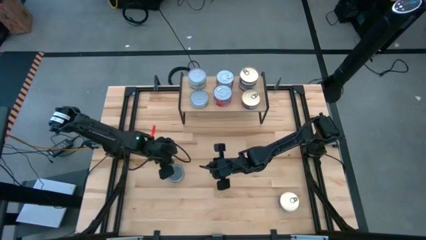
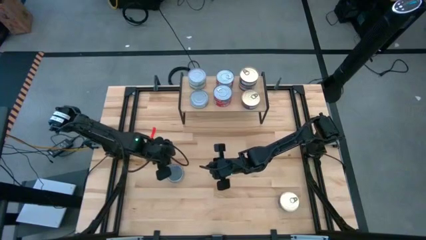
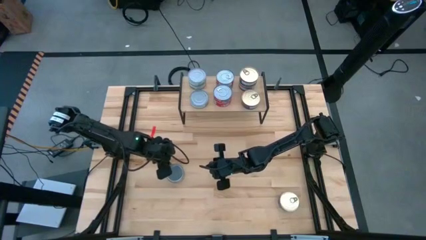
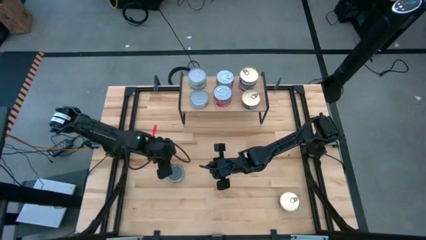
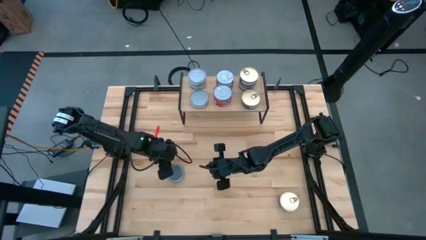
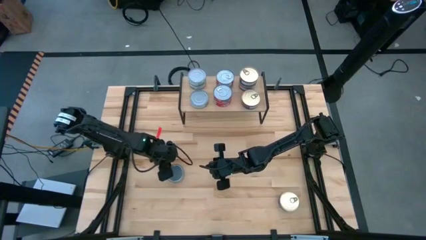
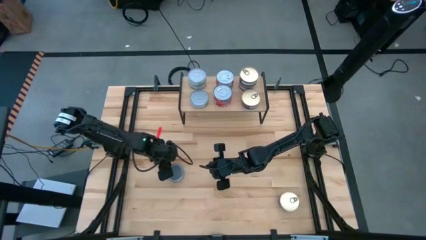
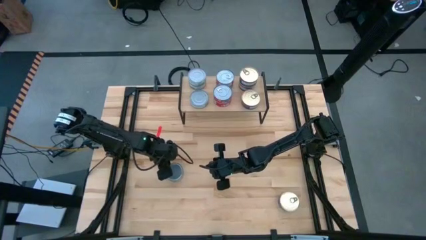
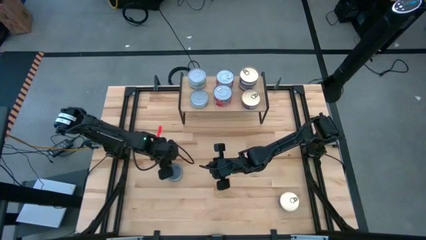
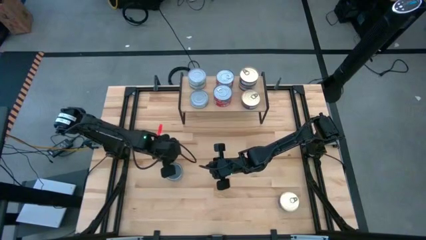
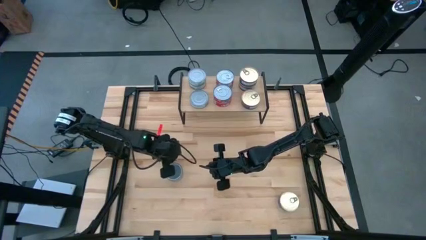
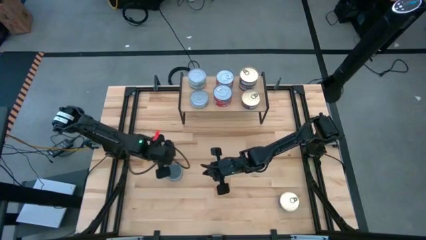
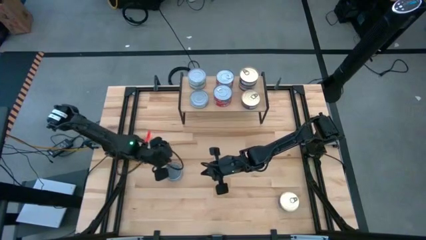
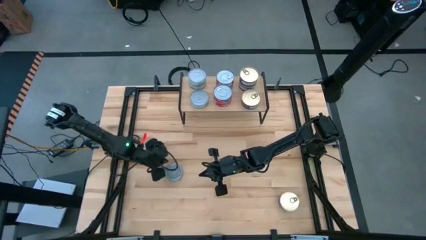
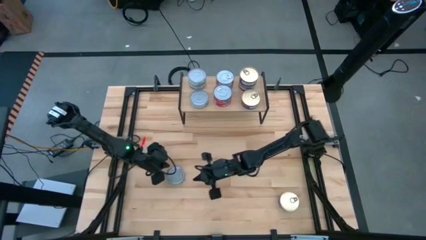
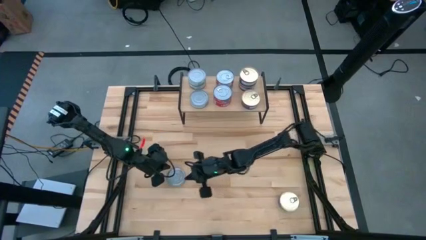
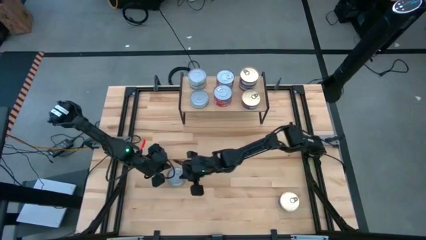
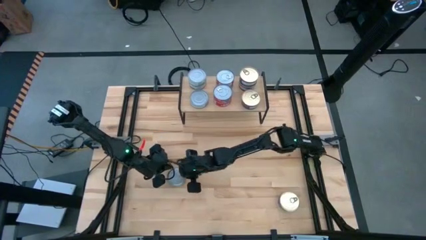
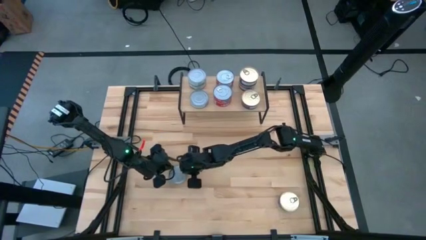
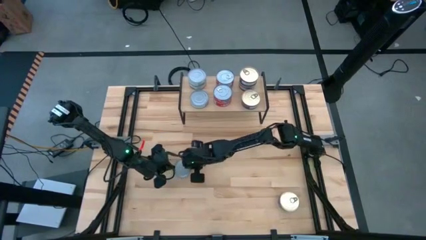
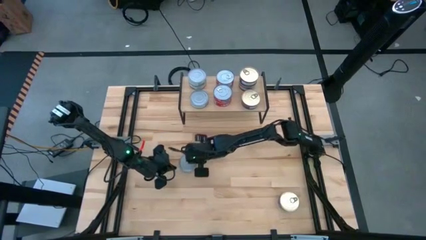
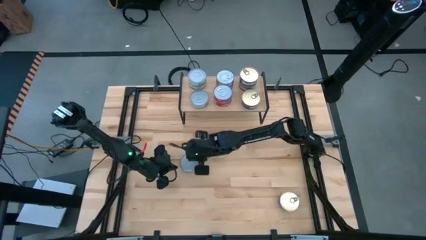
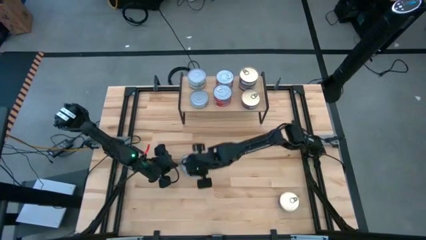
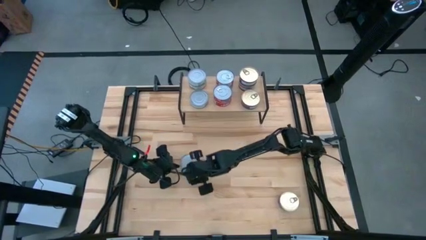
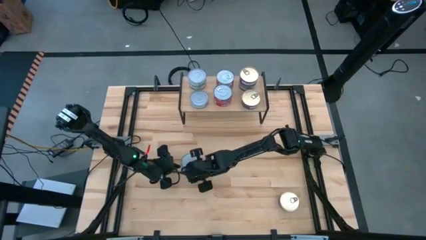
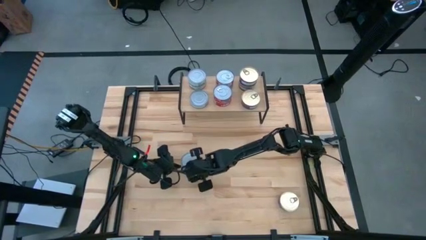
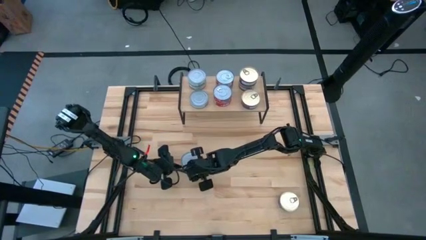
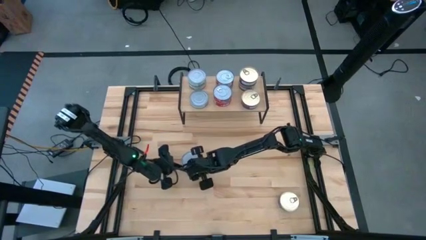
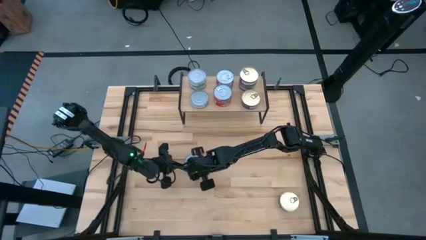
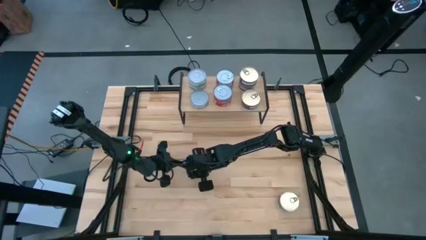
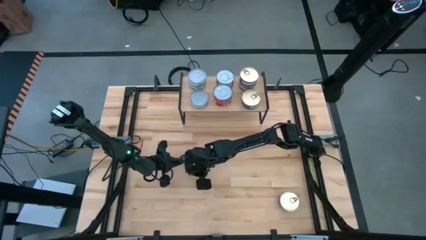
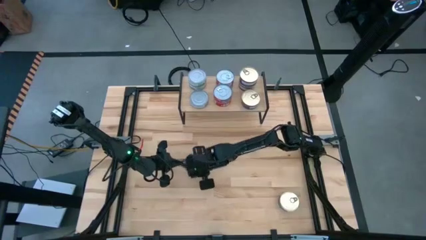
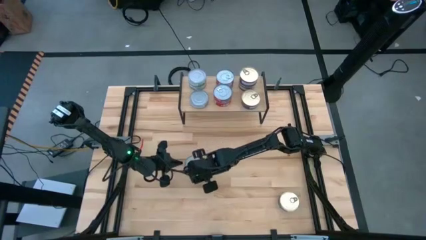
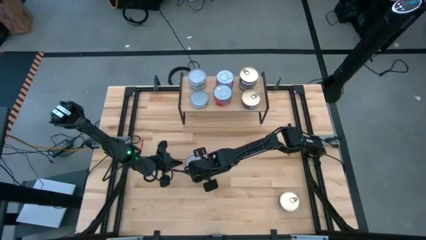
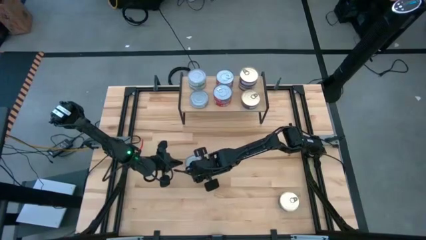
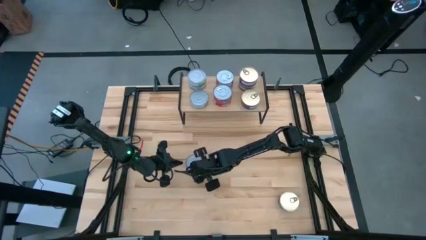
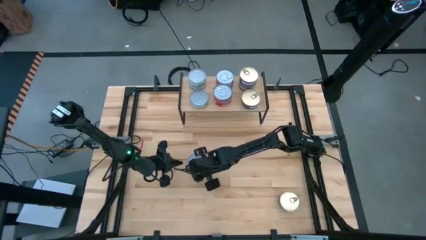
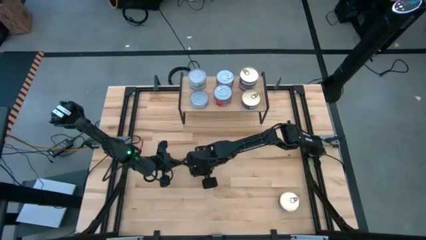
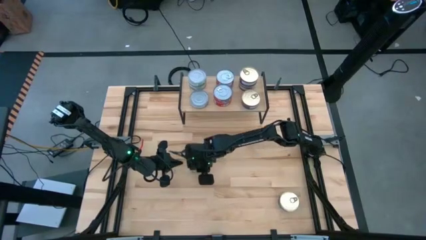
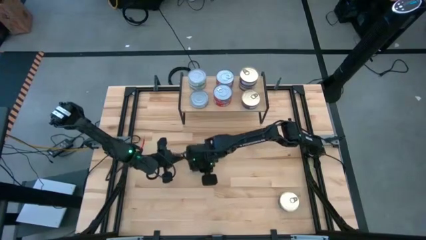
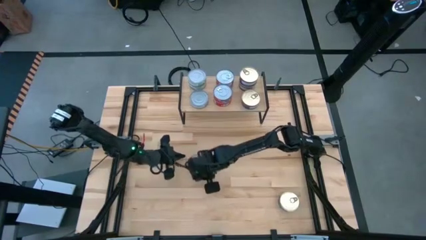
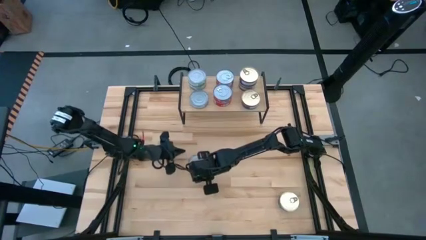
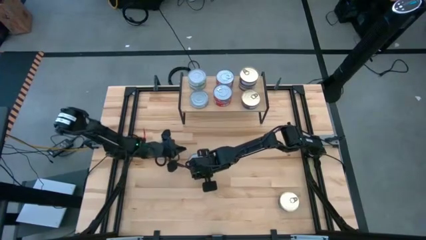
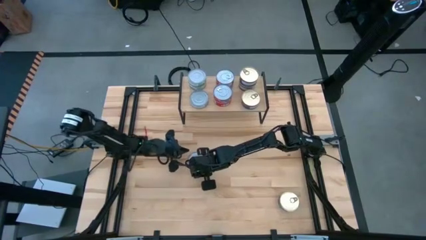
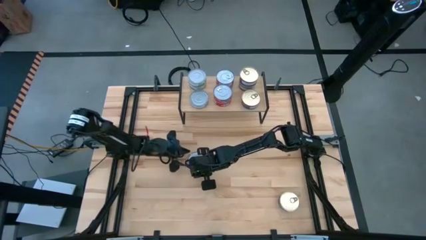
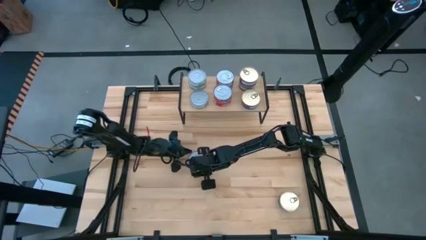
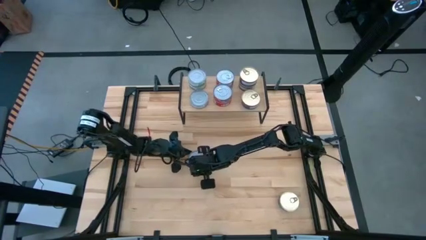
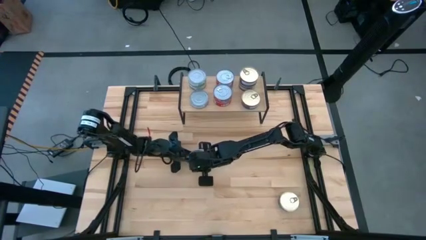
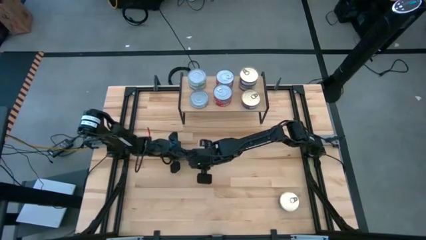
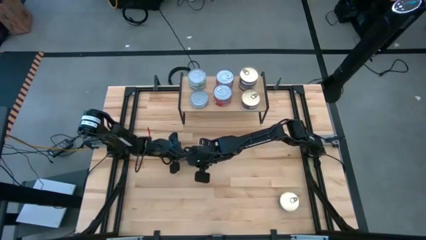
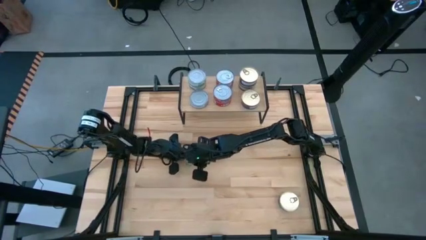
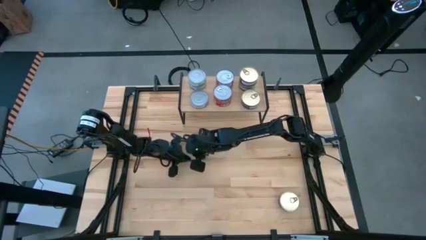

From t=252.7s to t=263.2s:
Task: Stack canned seafood by type on shelf
Stack the green and white tuna can on top of the green and white tuna can on the shelf

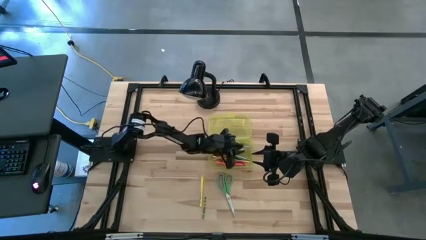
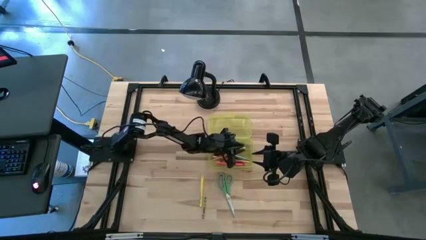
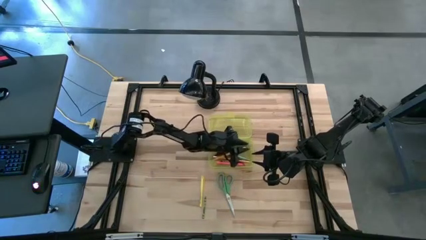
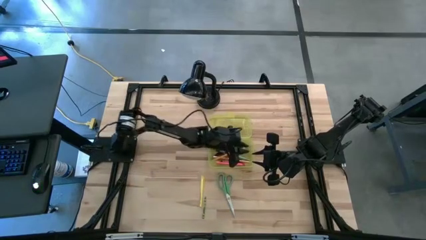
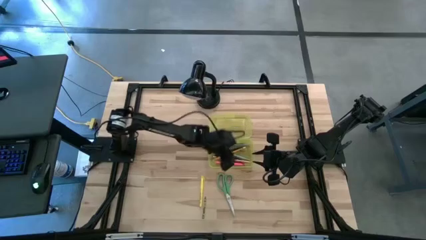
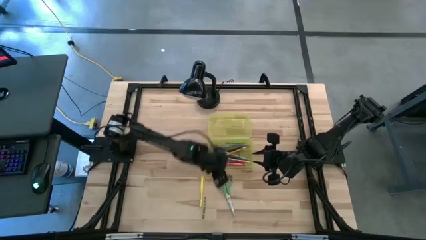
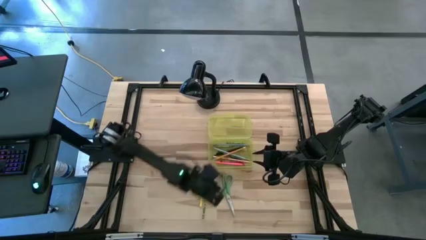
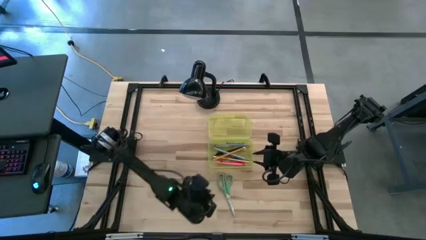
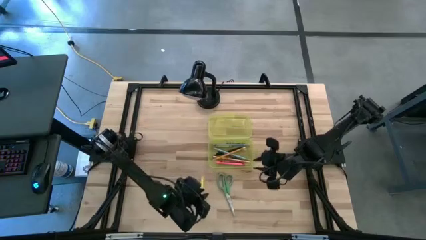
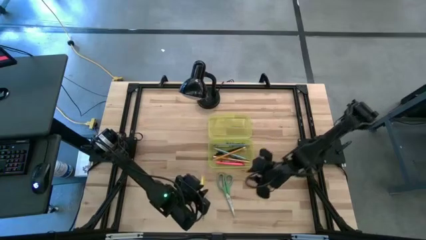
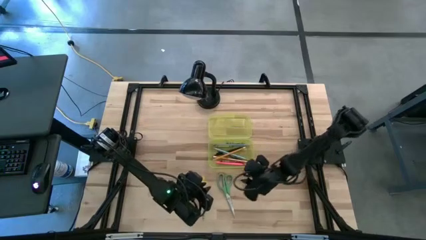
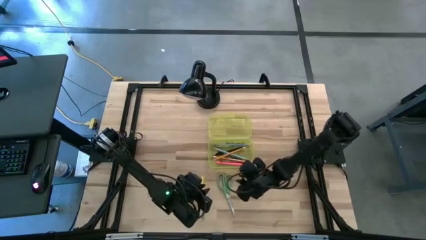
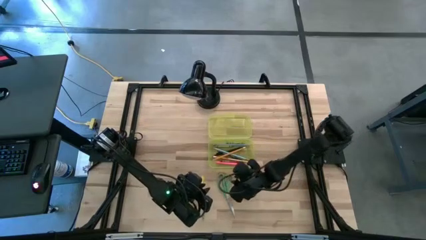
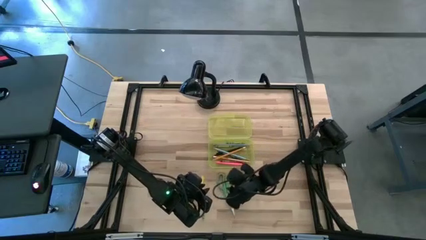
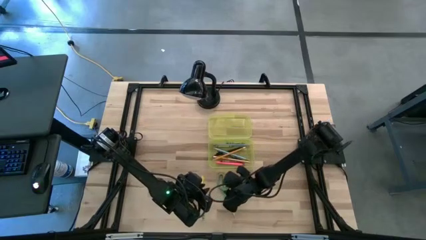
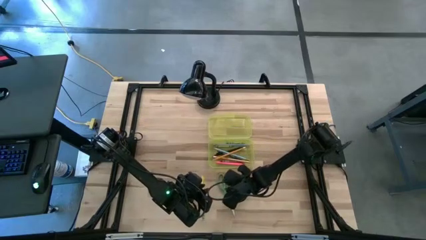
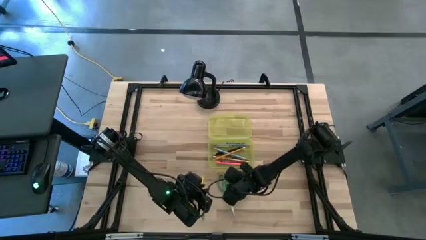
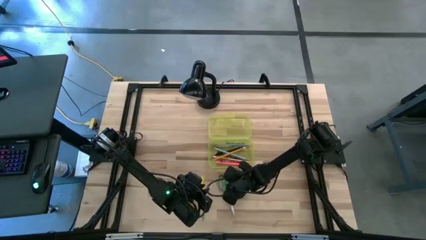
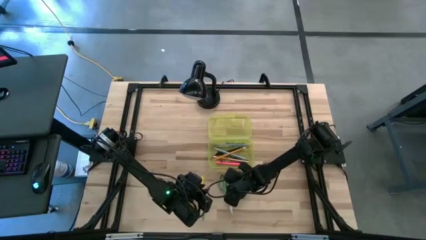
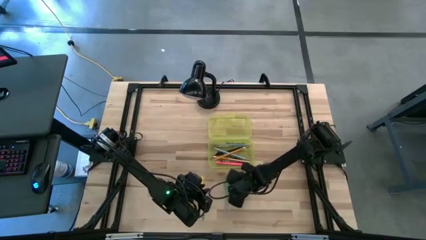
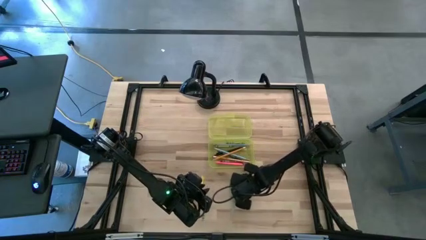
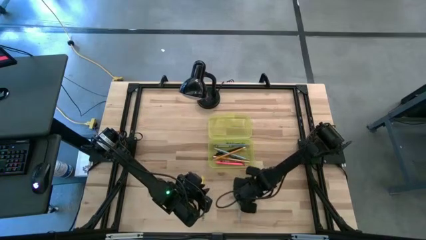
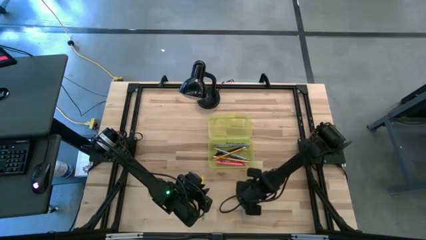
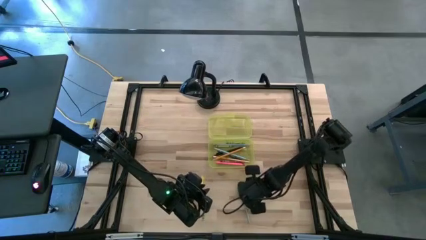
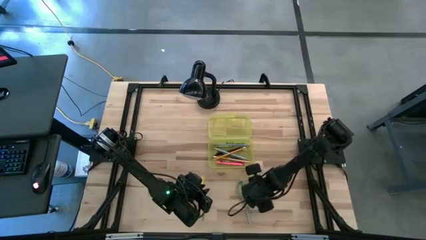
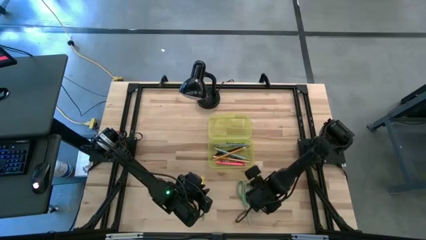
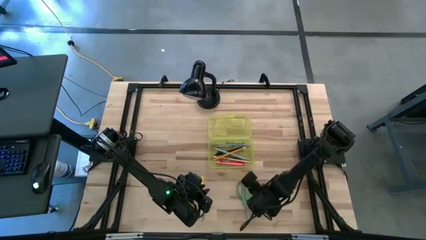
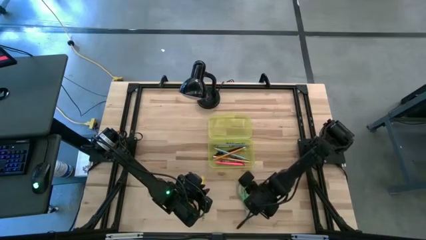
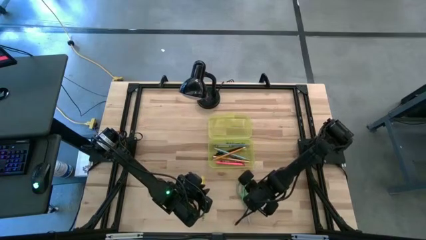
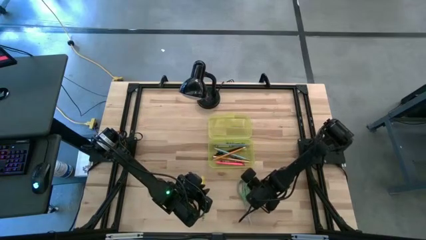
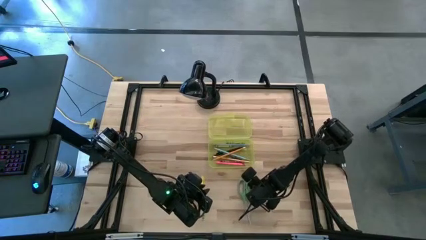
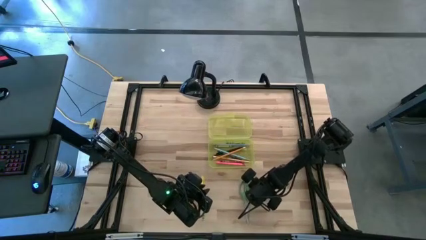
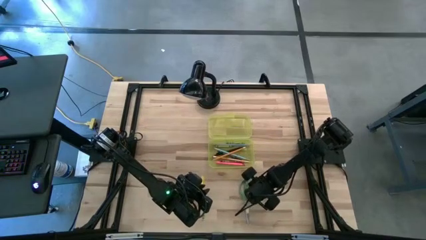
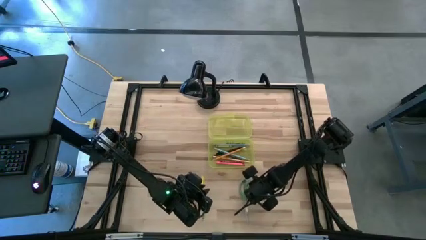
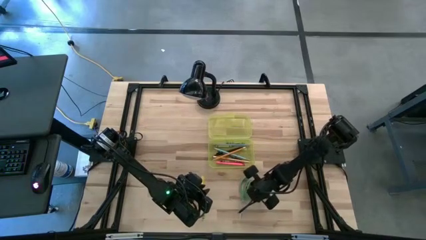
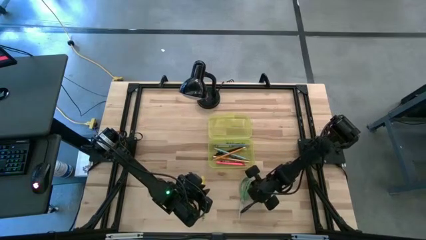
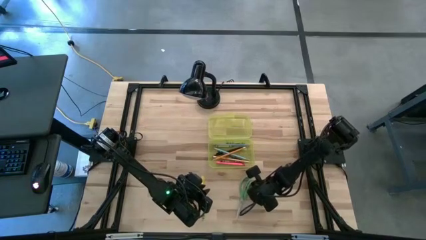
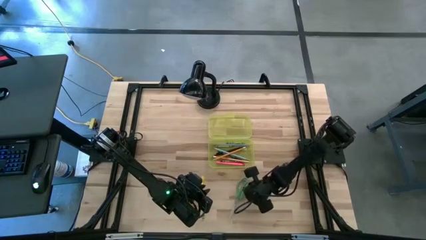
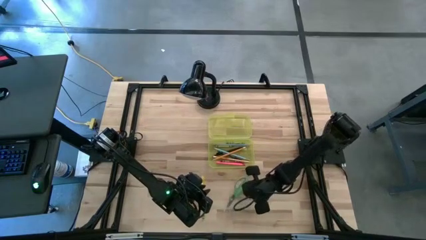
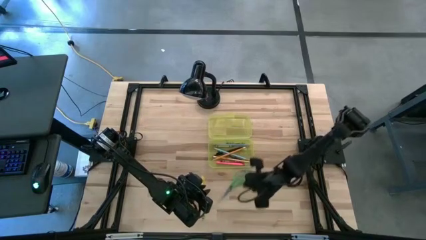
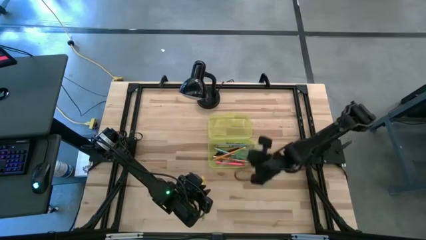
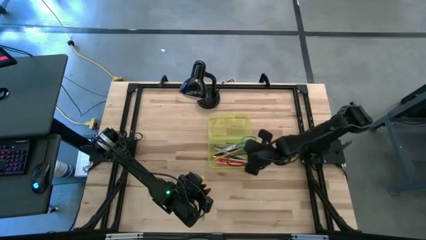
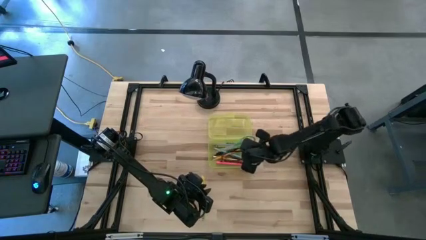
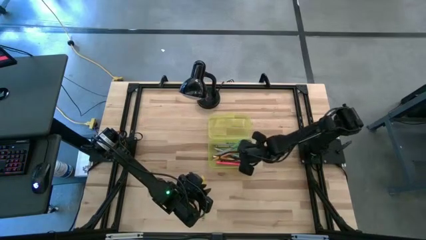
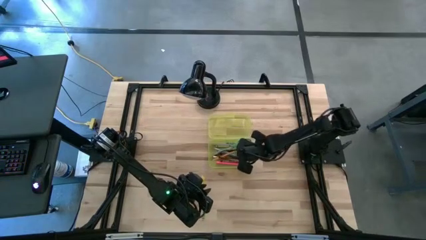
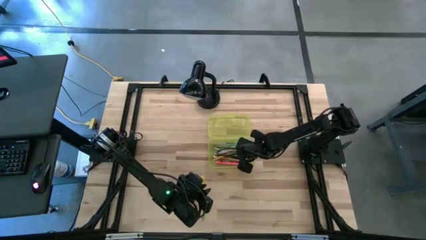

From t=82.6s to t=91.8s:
Task: Pick & place school supplies into a supply box
Put the green scissors into the yellow supply box
